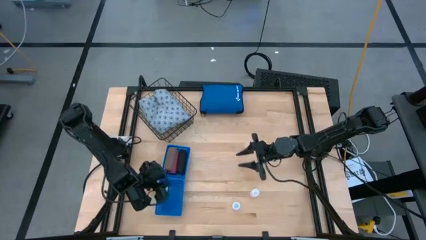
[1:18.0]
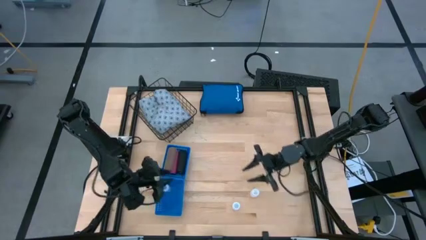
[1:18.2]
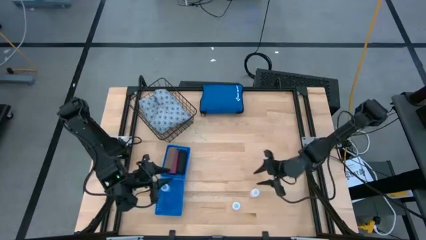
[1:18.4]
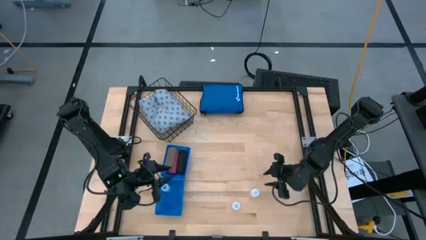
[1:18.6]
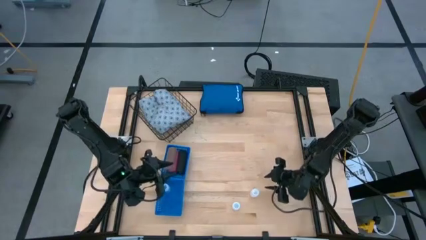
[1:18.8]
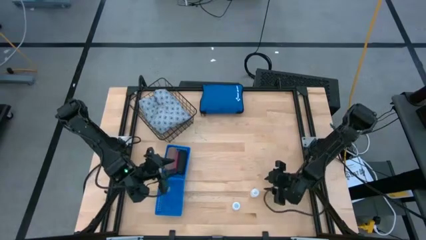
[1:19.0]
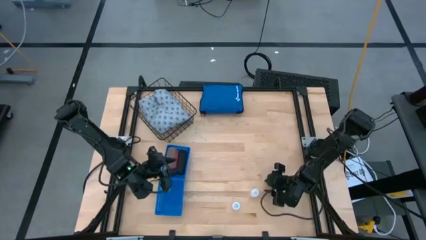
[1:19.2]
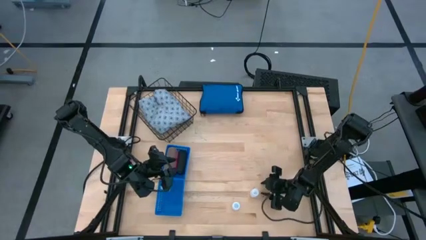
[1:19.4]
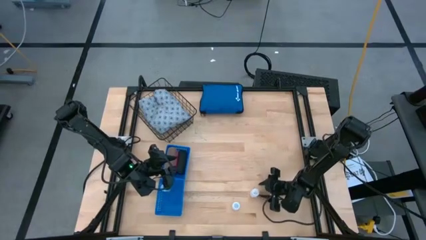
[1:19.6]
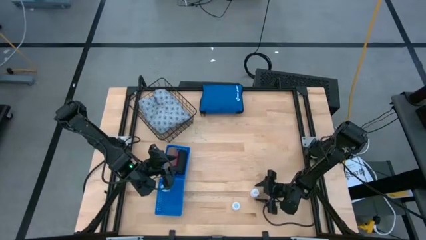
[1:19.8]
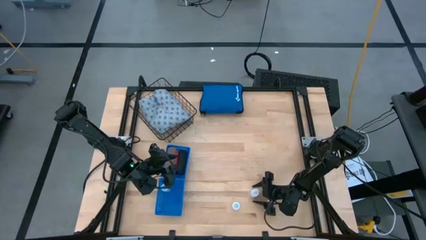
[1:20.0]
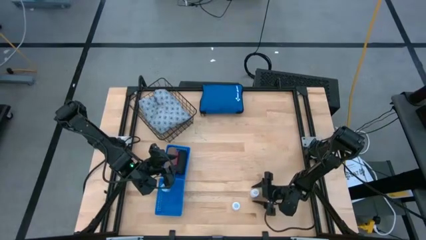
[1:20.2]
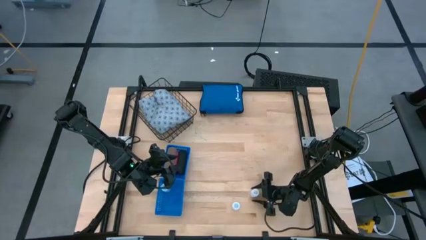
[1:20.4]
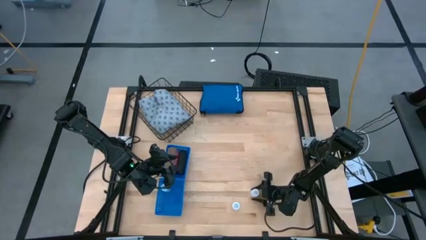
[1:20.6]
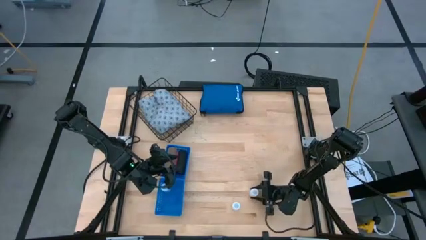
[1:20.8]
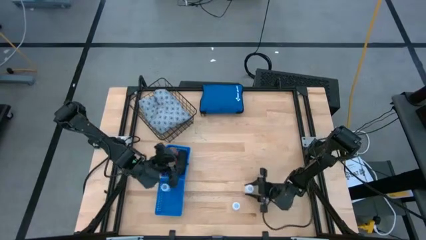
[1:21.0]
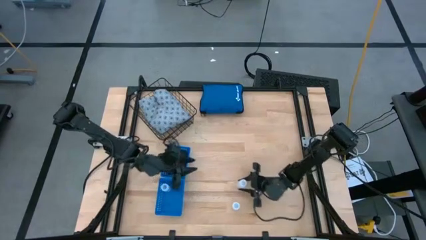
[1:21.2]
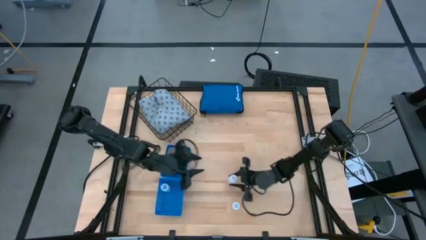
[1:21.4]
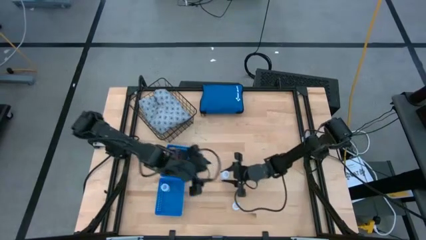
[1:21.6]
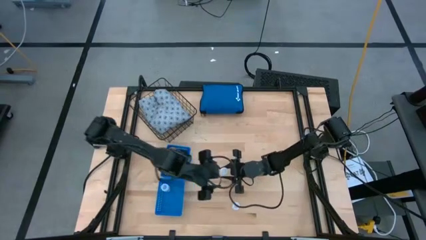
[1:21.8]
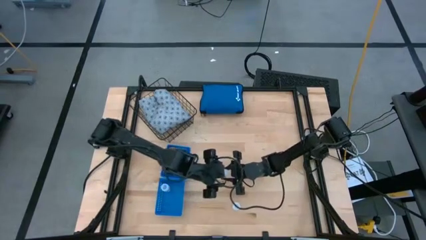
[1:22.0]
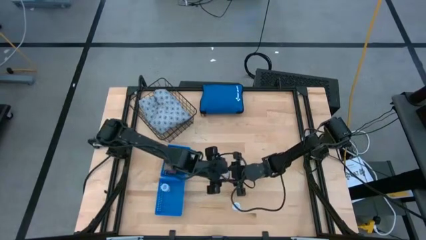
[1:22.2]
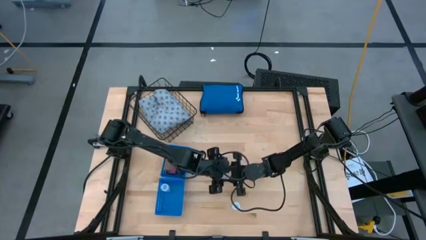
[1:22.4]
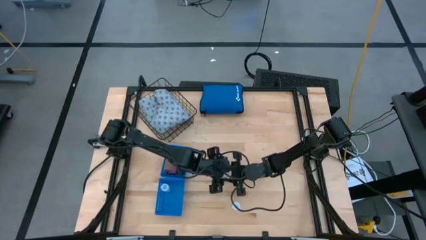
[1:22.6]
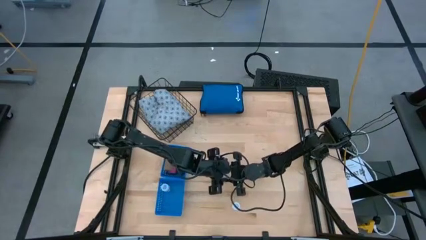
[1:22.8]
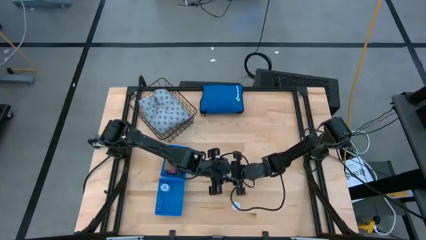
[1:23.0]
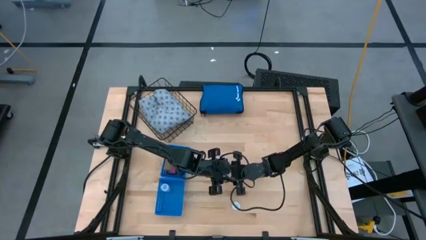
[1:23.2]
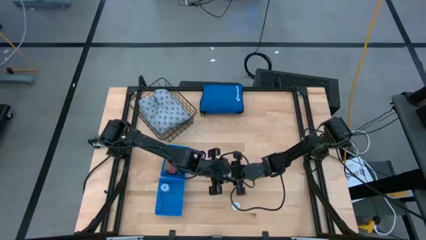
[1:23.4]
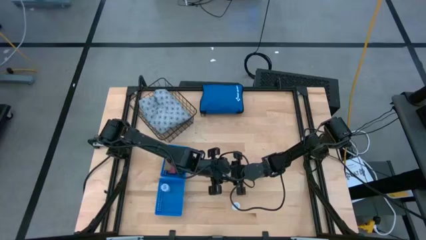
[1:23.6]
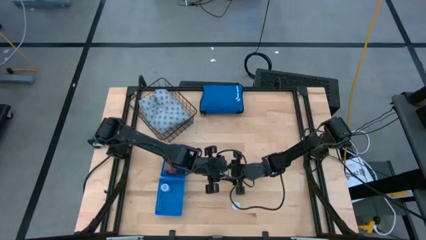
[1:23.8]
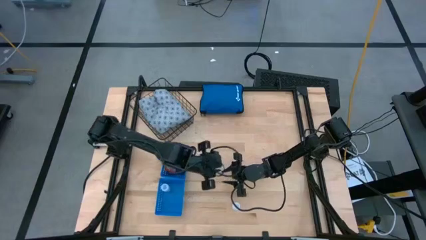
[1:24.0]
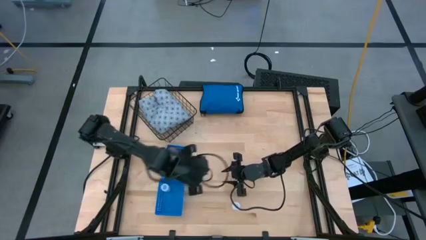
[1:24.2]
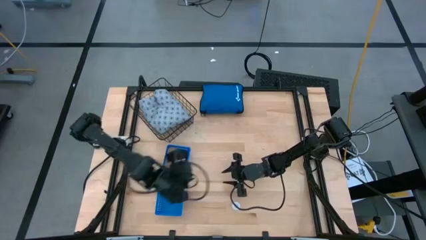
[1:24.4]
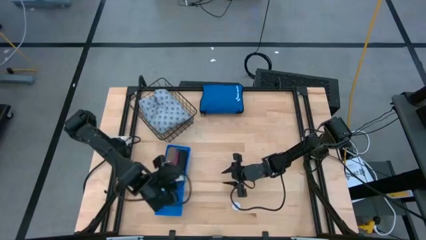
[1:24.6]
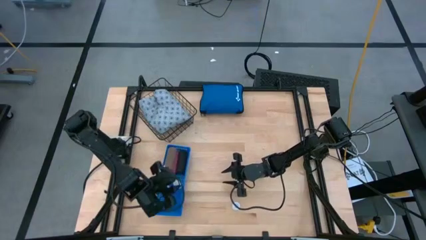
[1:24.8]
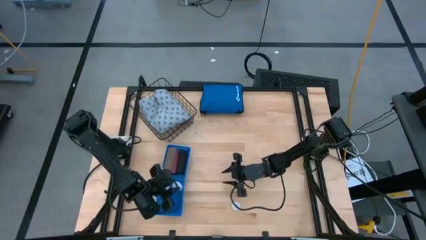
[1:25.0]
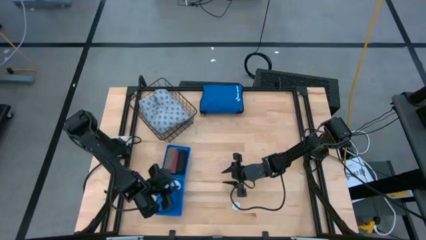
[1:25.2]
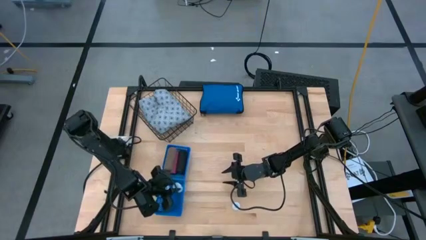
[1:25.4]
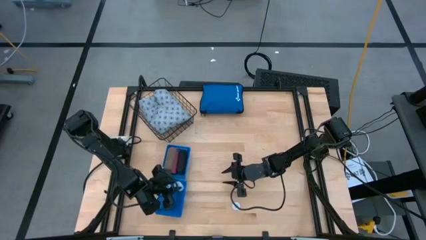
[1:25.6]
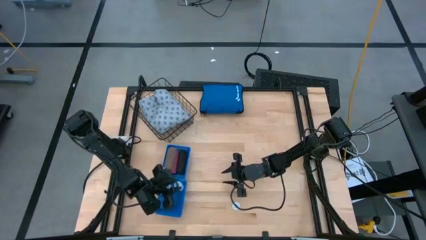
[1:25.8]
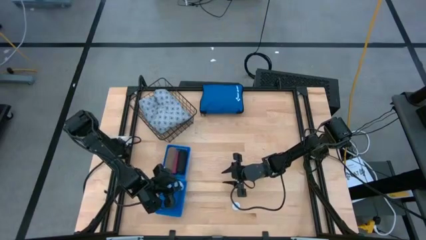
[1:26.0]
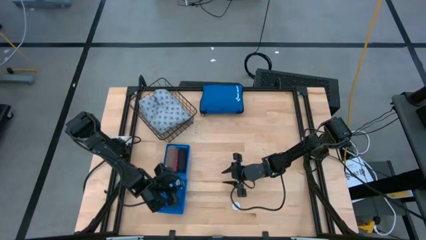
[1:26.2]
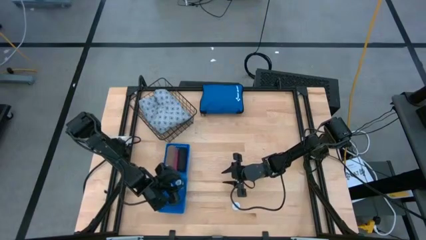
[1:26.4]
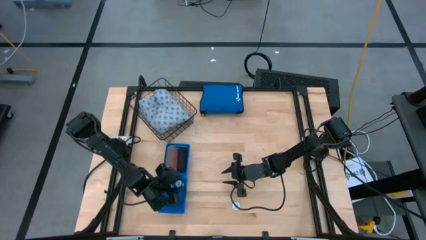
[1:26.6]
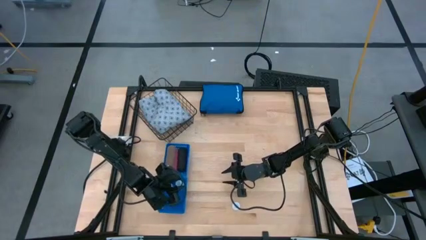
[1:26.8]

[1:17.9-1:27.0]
Task: Pick & place medical supplies in basket/bin
Put the right white pill bottle into the bottom blue bin
